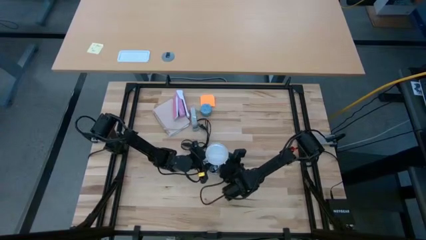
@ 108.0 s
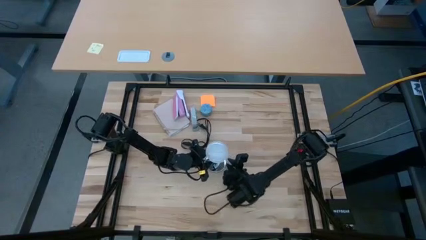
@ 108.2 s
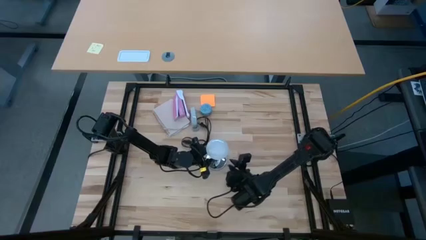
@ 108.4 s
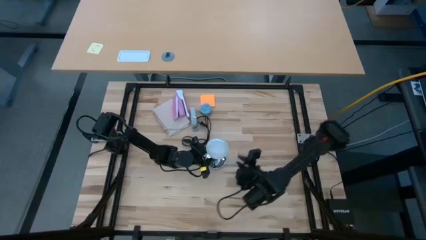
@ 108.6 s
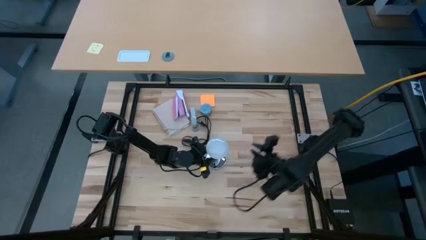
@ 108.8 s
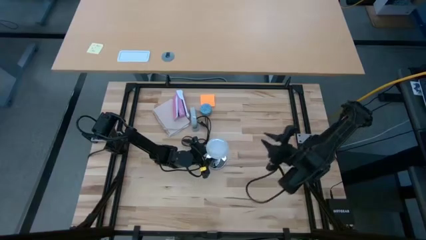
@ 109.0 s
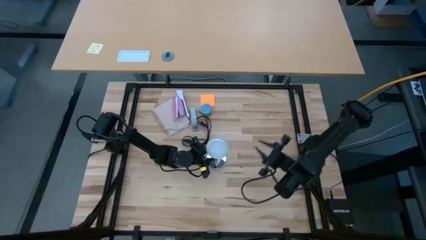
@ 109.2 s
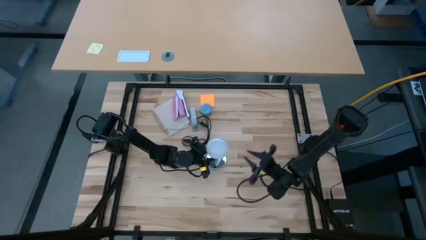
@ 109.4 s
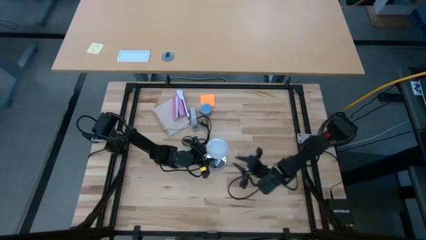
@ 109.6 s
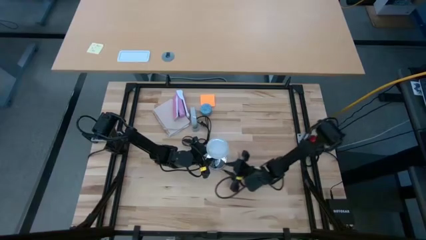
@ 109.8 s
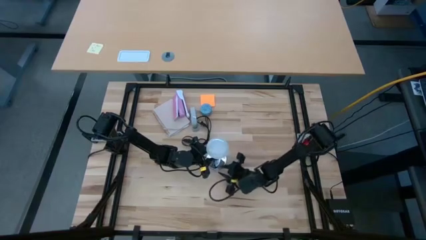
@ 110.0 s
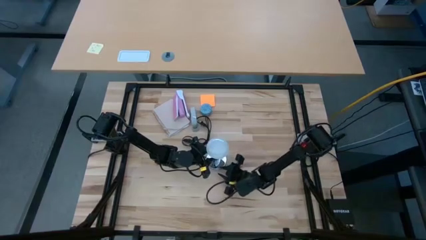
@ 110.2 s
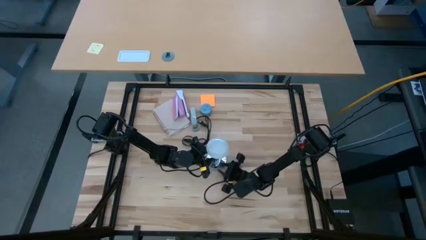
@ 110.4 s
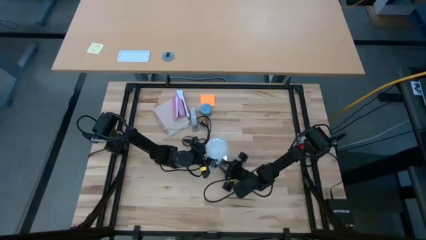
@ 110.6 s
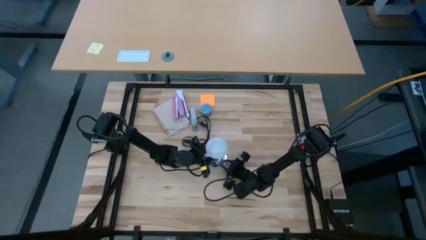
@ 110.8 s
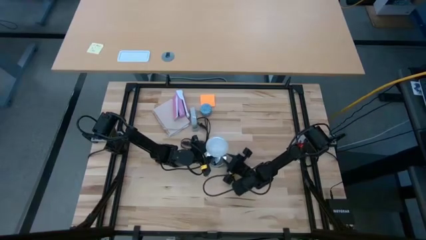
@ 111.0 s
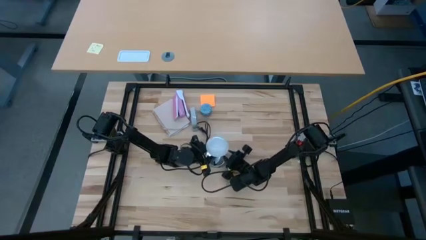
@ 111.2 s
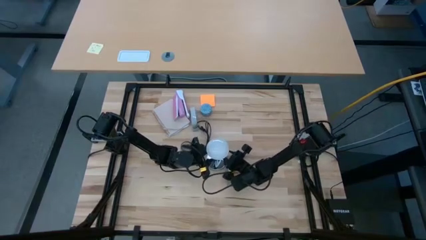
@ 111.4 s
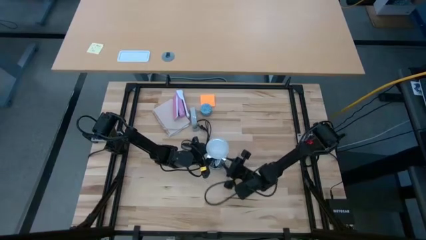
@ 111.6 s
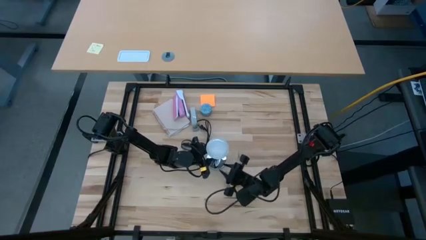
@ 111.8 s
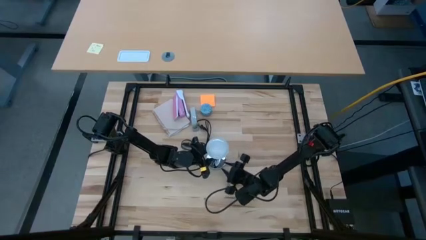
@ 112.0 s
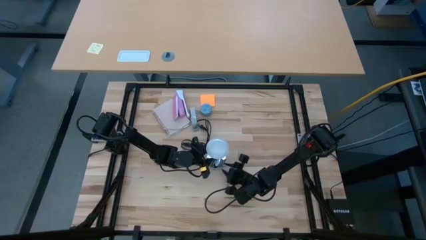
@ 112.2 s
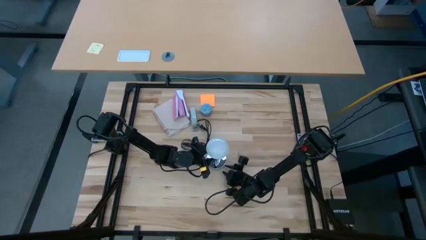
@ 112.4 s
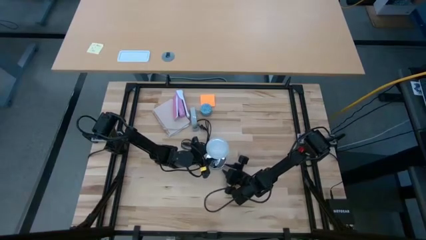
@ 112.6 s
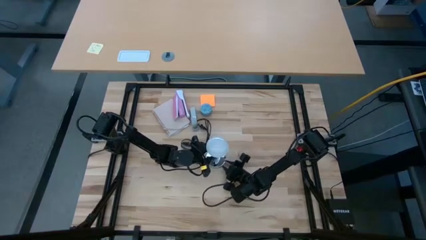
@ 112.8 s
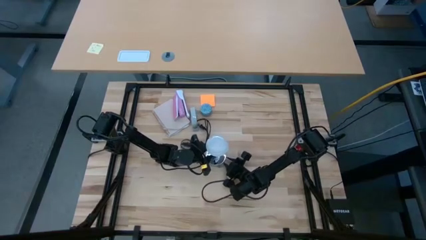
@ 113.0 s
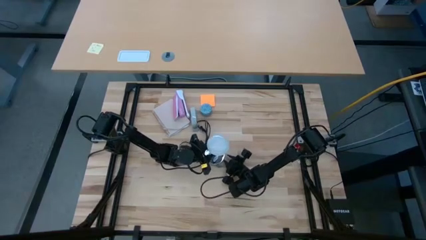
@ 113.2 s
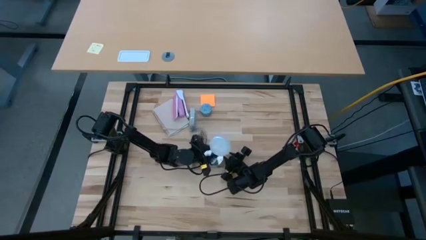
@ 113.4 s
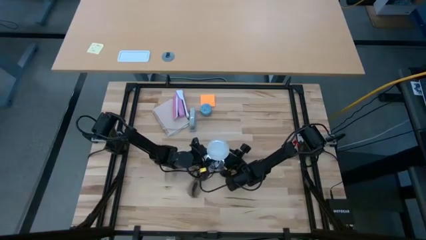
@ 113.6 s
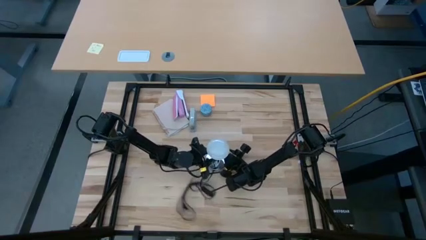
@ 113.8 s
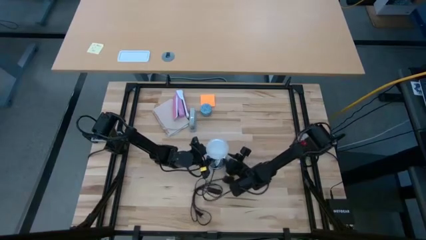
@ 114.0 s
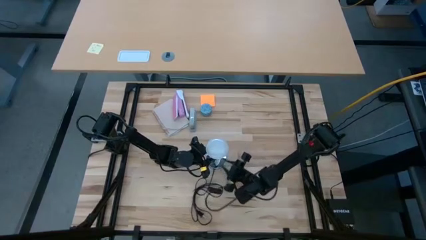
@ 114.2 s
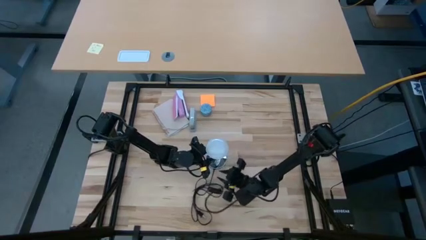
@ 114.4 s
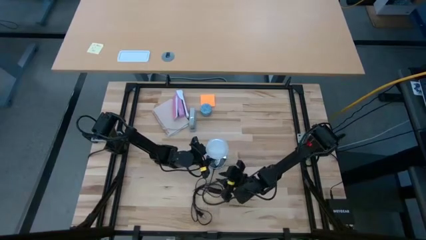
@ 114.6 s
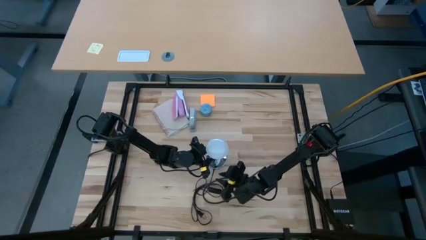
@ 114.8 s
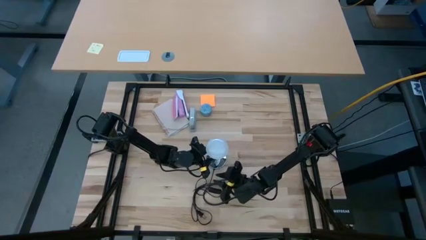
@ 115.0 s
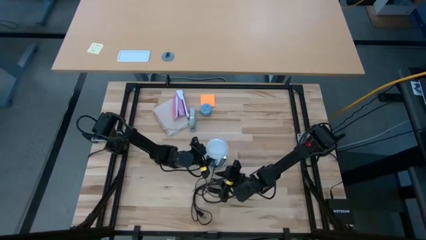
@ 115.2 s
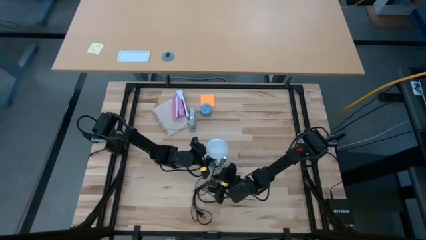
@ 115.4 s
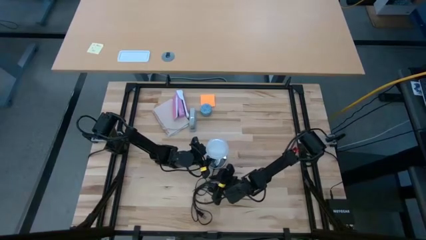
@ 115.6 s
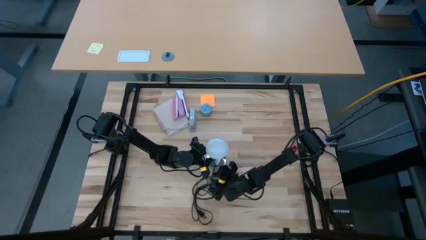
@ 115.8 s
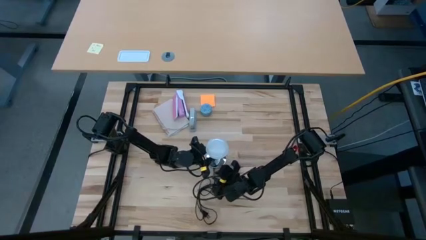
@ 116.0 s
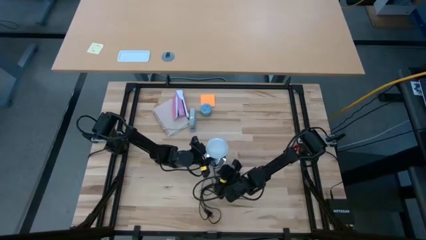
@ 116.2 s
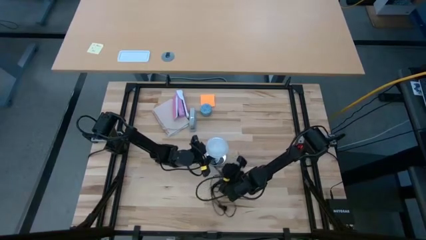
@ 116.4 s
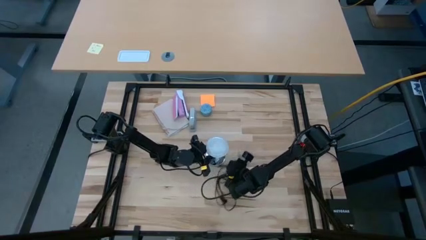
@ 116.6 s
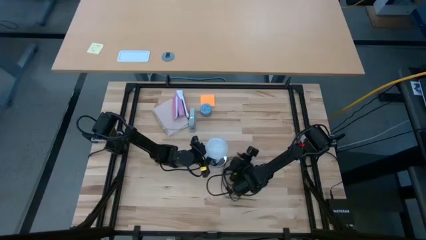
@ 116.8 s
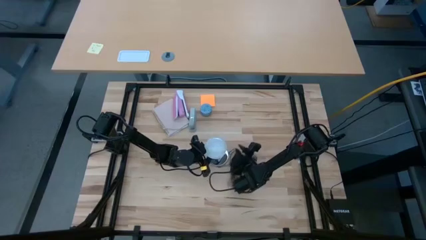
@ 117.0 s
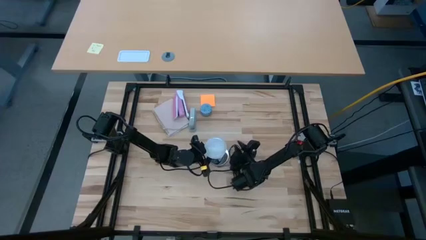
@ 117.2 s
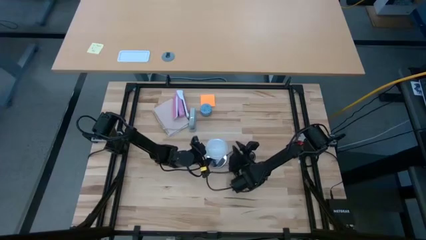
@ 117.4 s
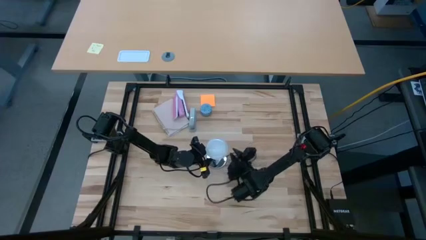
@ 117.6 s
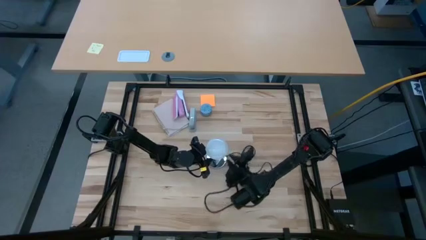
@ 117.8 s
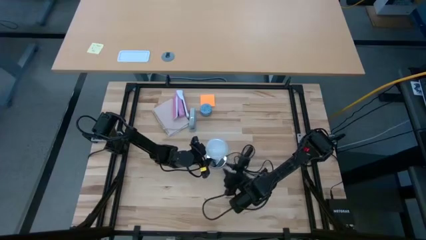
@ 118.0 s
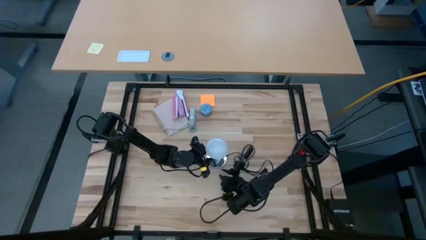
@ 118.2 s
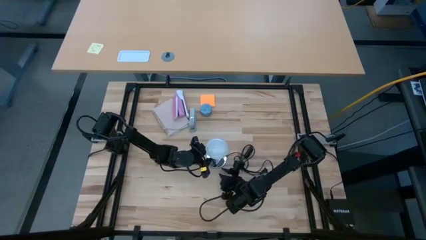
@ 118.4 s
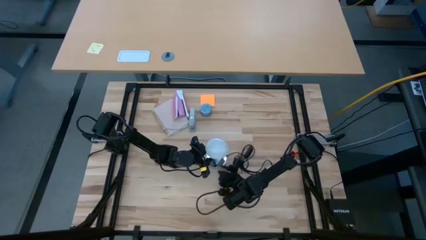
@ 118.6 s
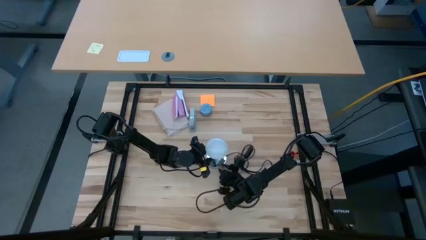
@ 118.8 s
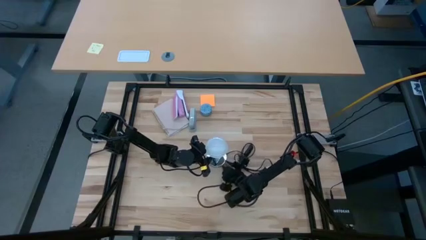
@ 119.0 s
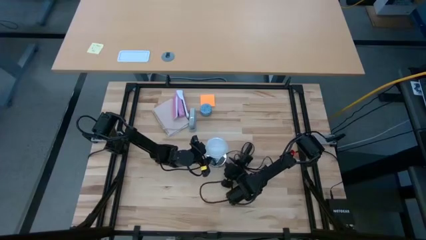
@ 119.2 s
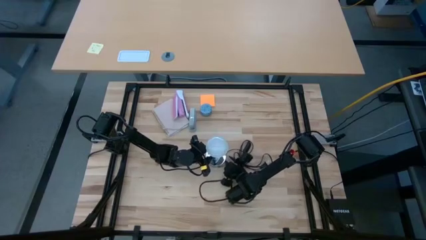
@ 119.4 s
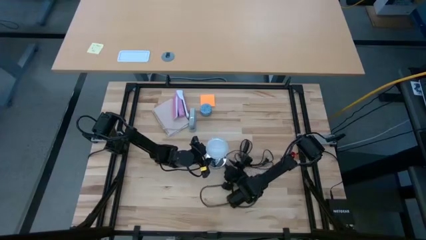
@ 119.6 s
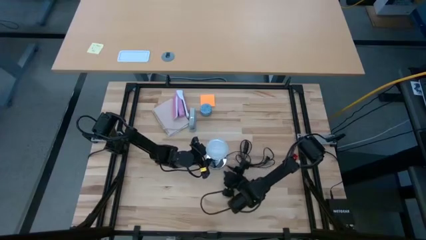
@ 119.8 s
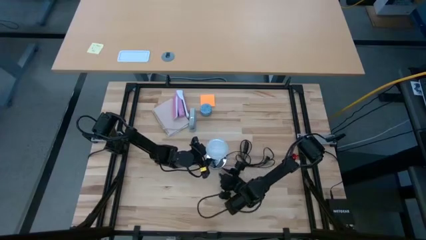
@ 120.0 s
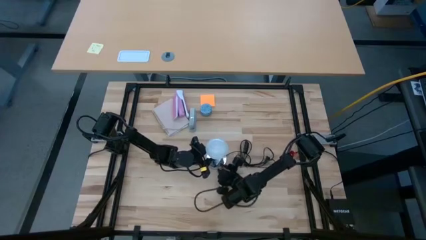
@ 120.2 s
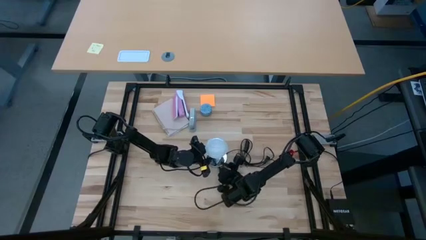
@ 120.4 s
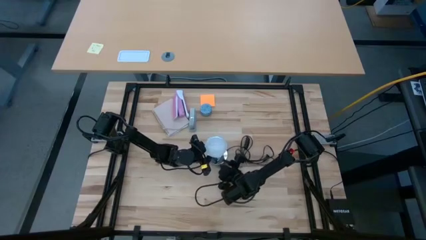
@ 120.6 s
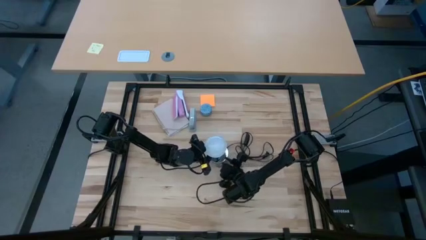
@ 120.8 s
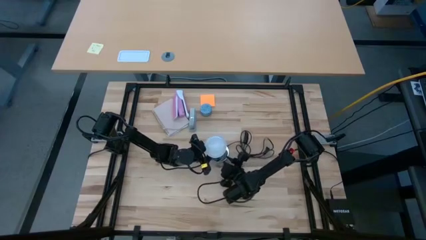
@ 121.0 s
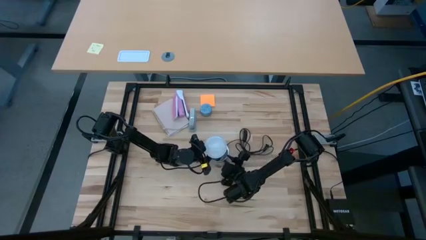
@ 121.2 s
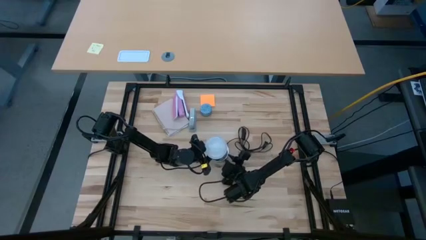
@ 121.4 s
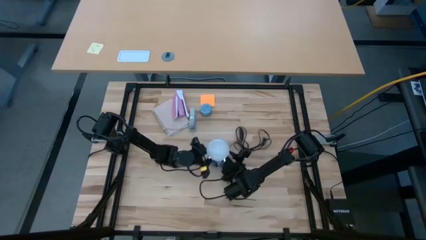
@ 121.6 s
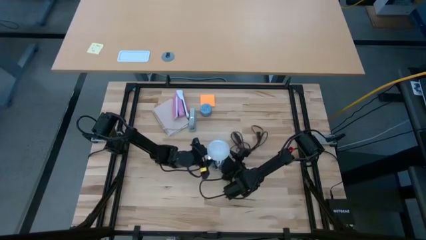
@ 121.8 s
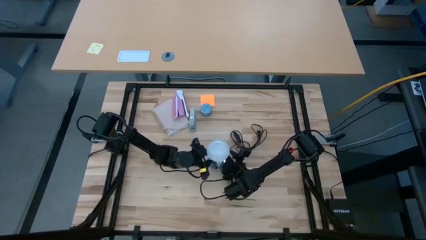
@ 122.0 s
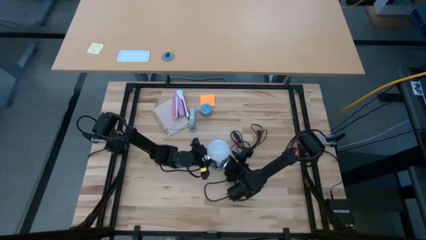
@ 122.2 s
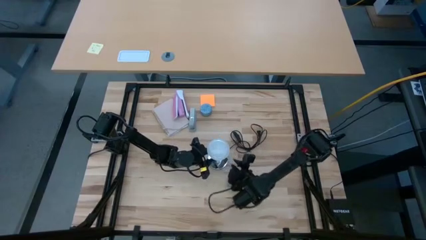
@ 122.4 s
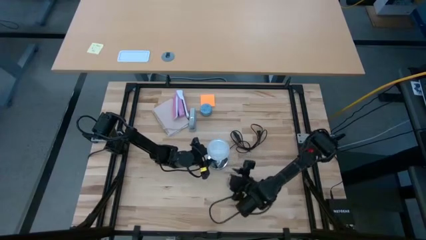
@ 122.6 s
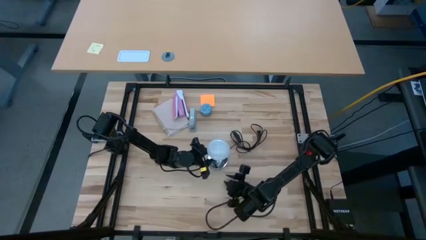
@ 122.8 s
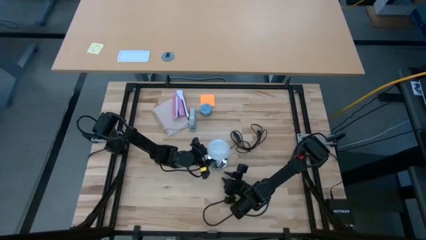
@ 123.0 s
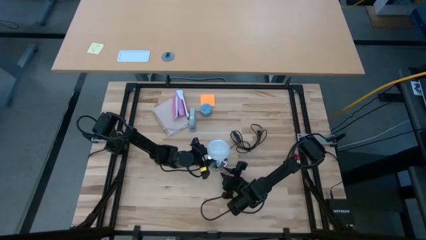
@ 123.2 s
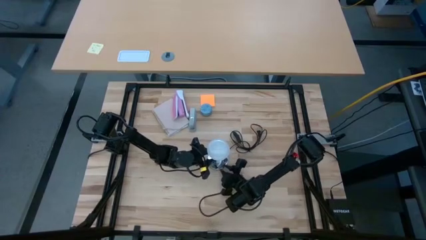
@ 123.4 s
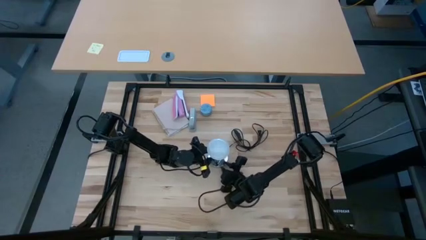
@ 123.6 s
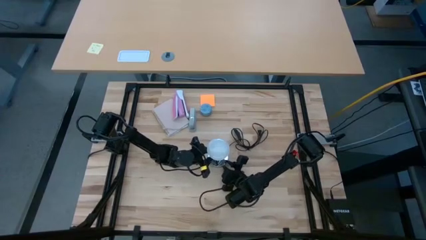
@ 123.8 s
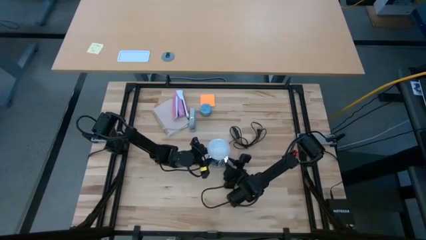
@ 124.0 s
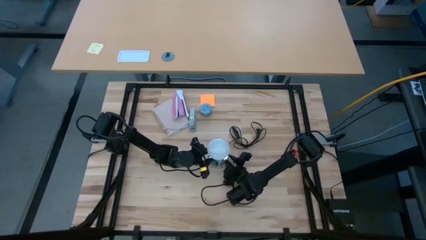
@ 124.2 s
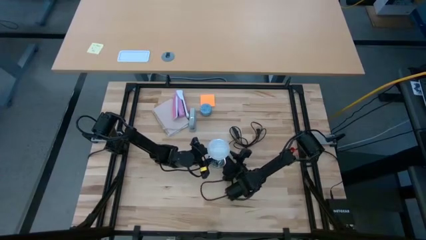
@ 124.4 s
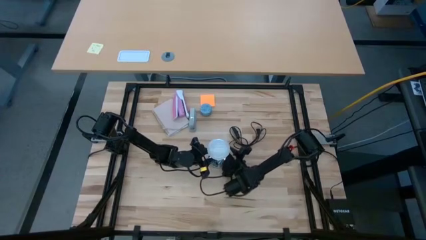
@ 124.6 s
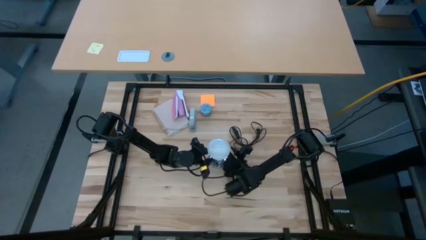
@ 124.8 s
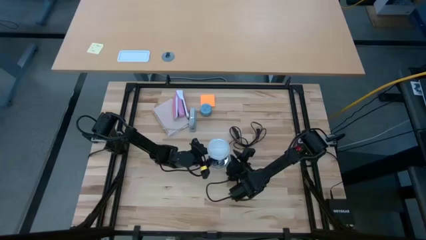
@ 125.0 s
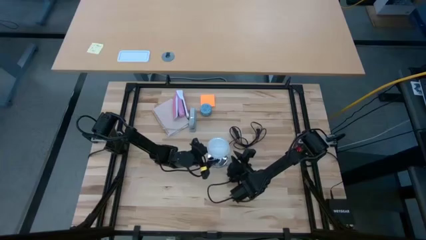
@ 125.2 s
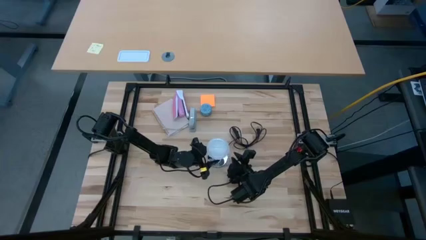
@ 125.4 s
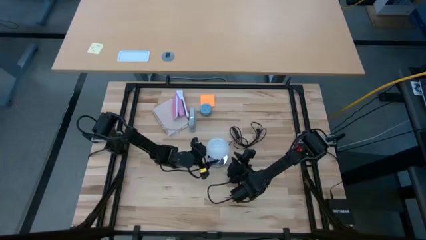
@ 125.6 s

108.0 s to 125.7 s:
Task: Screw lightbulb
Insert the white lightbulb into the silver lamp
